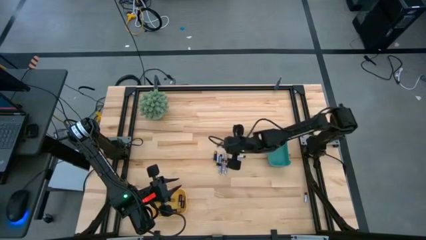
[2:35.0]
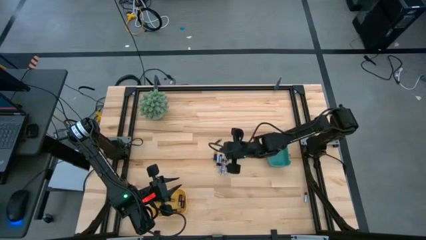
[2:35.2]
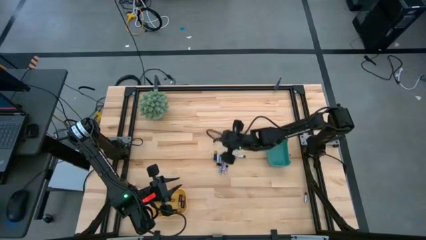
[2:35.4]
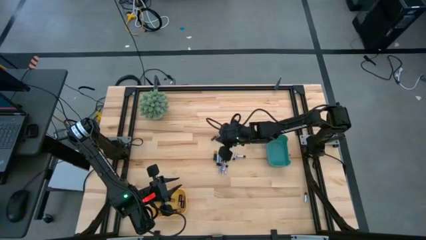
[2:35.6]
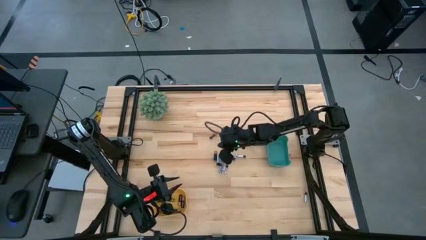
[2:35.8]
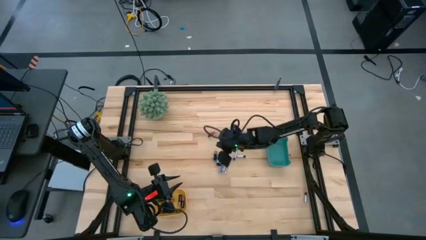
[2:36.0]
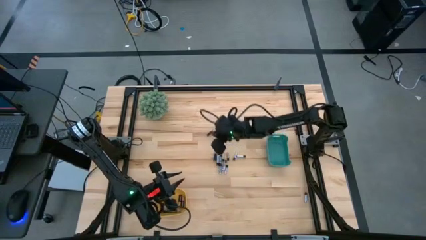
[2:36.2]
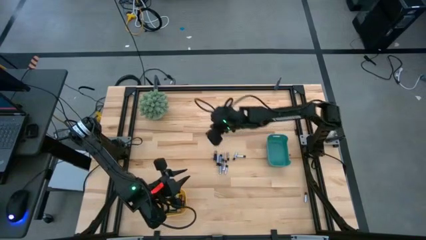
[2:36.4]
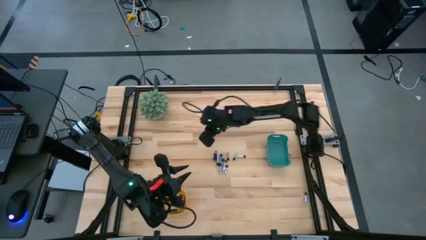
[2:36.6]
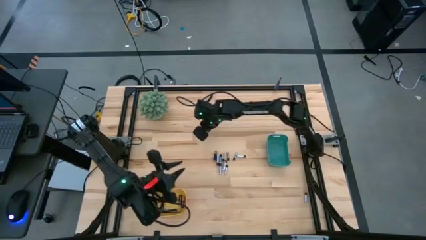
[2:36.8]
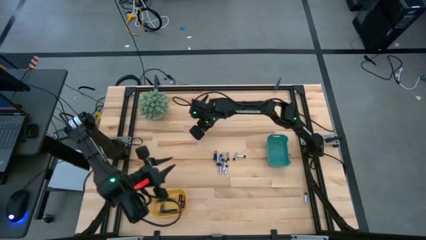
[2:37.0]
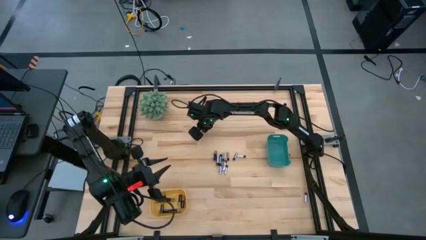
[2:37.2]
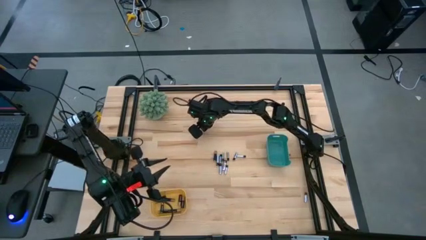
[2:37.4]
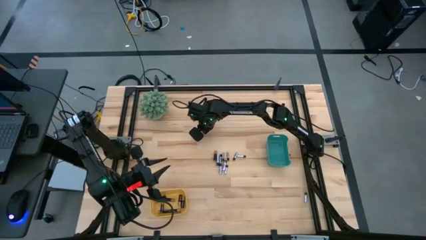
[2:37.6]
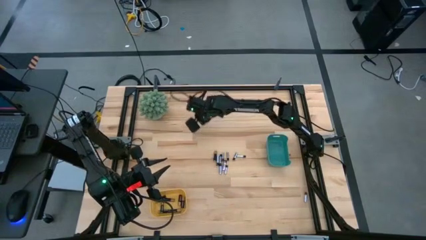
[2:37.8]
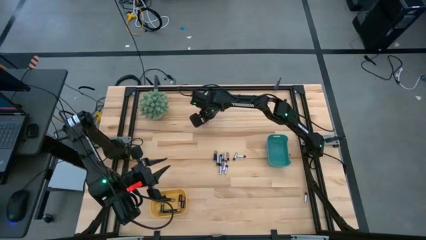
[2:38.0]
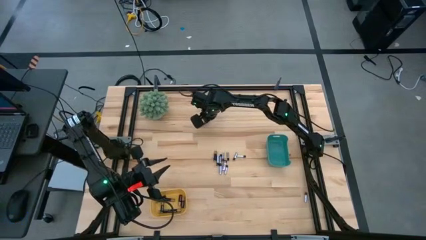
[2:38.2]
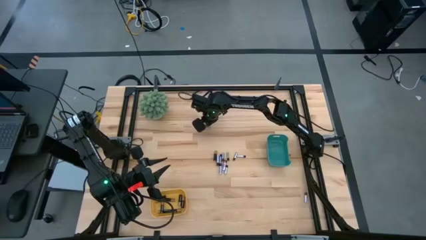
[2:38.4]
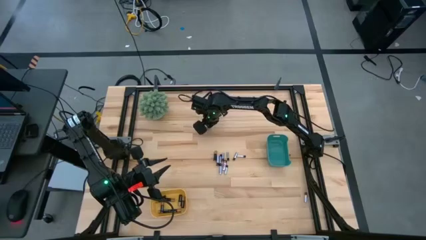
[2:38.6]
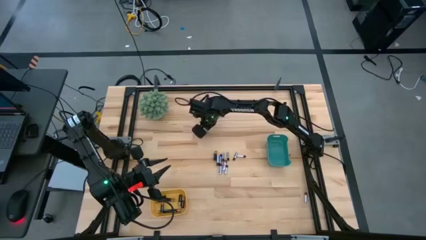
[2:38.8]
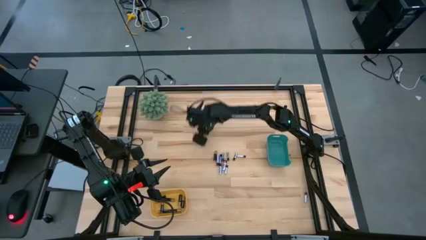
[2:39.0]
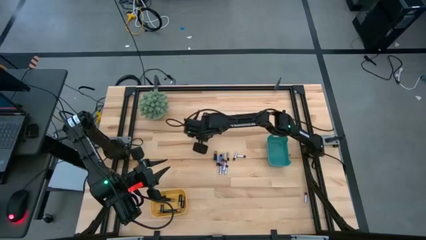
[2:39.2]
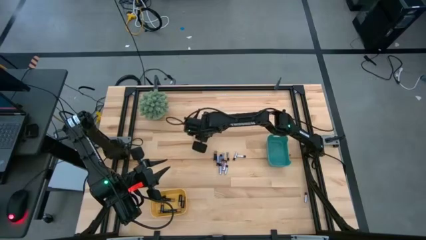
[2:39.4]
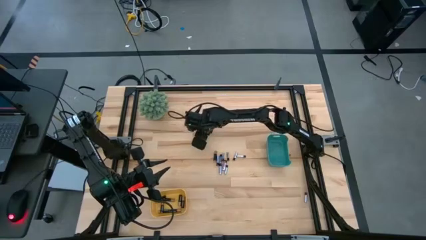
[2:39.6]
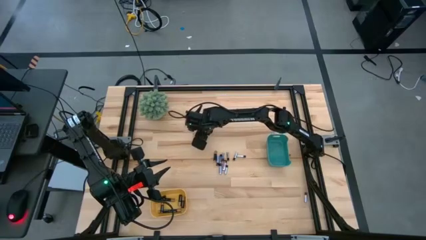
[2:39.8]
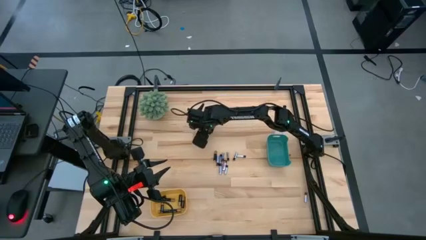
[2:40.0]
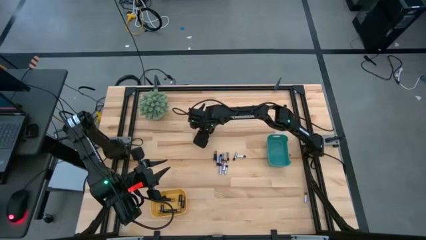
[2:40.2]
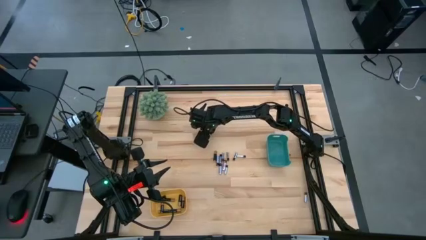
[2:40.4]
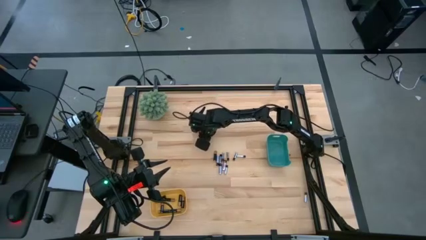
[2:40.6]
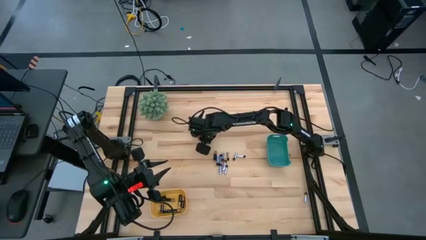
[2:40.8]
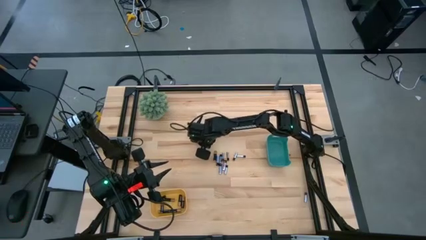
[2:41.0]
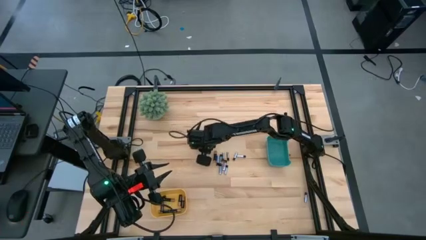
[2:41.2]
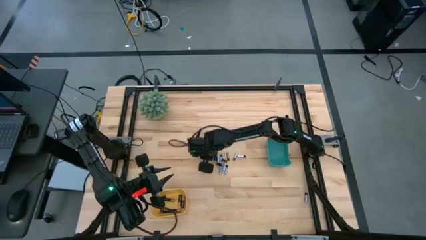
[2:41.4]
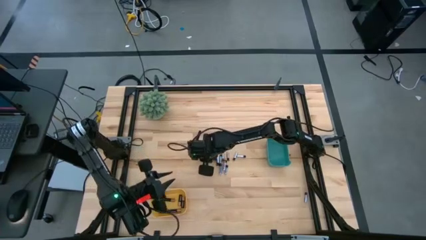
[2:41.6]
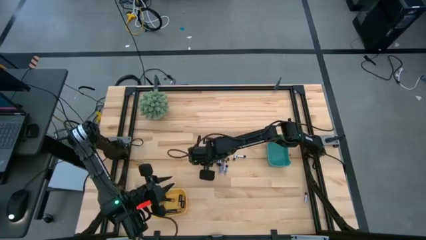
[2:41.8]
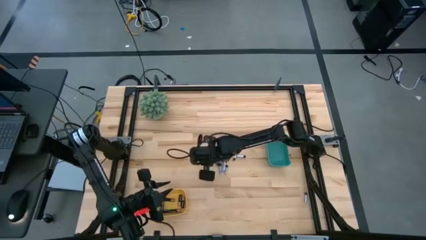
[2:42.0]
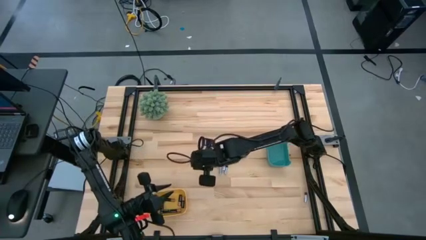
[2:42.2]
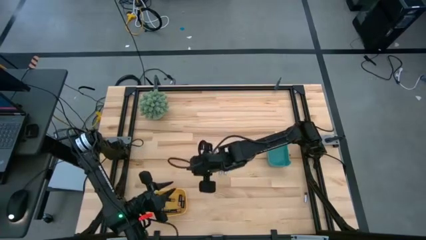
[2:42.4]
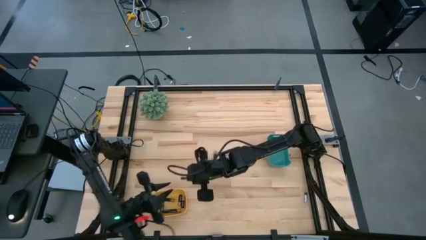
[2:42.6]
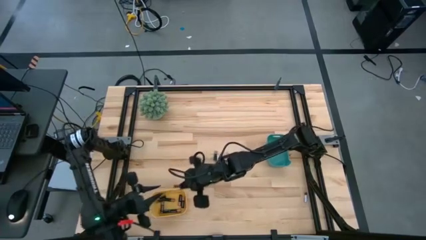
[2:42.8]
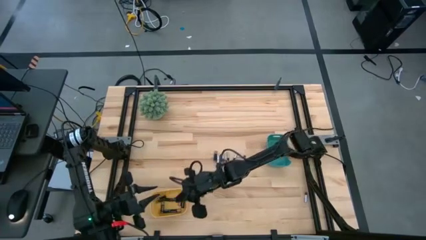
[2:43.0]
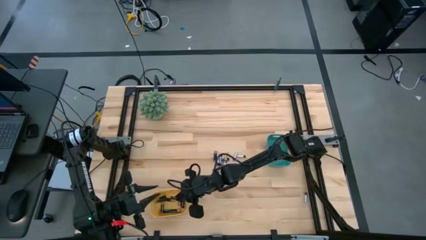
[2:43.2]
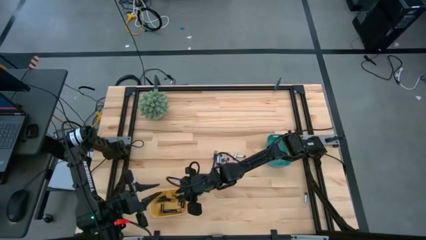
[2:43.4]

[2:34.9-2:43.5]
Task: Sort batteries
Put the black battery into the yellow bin

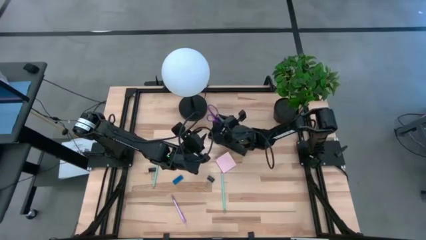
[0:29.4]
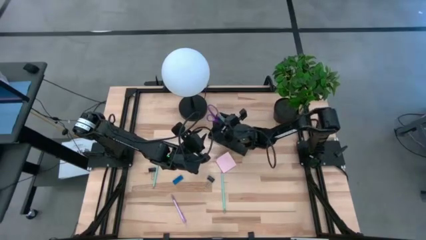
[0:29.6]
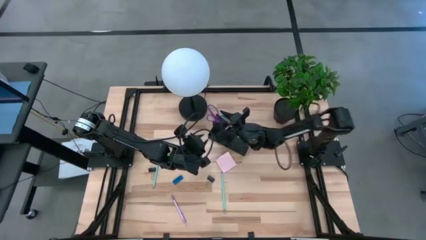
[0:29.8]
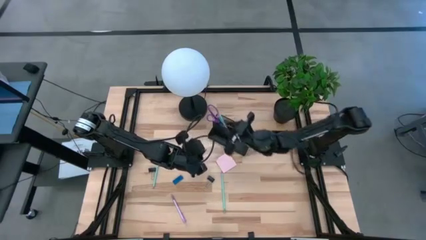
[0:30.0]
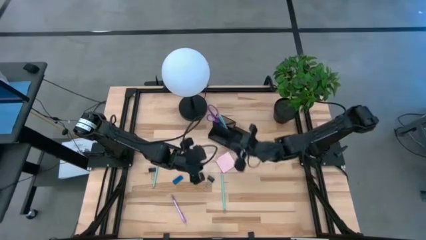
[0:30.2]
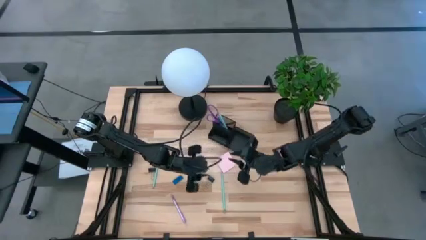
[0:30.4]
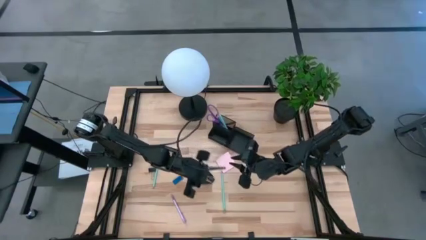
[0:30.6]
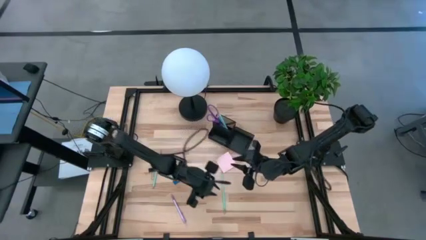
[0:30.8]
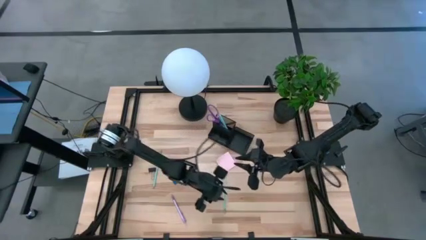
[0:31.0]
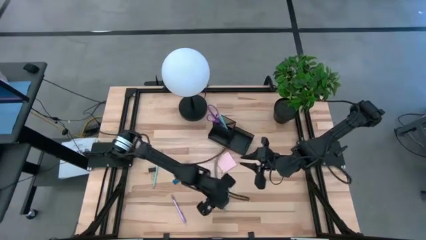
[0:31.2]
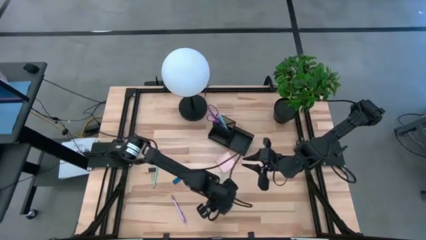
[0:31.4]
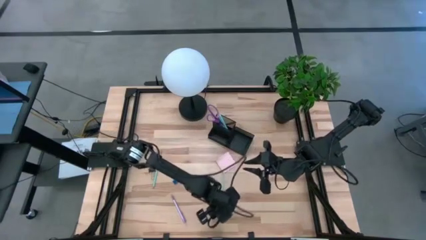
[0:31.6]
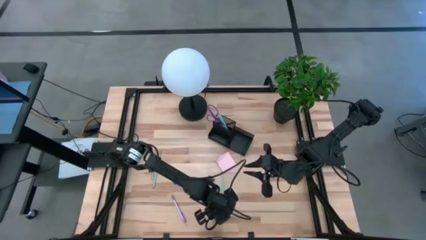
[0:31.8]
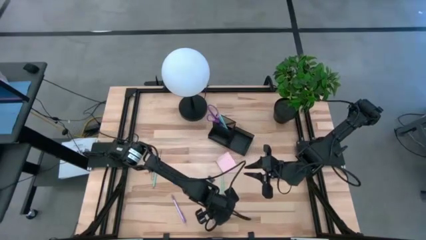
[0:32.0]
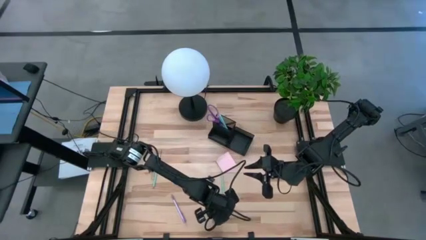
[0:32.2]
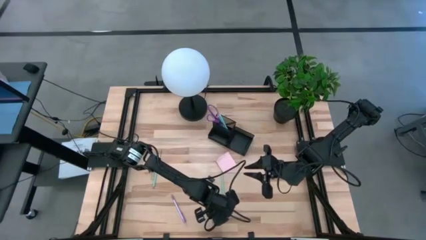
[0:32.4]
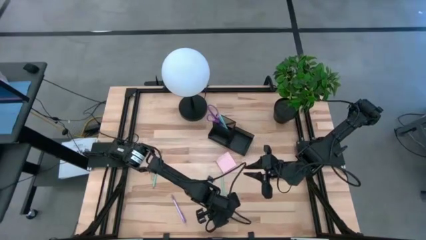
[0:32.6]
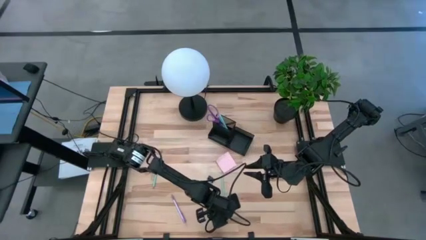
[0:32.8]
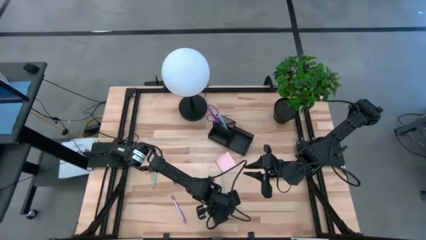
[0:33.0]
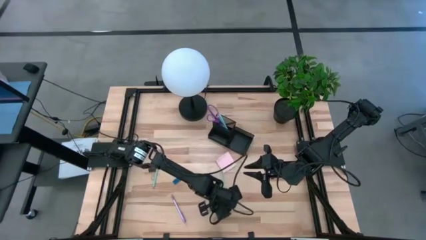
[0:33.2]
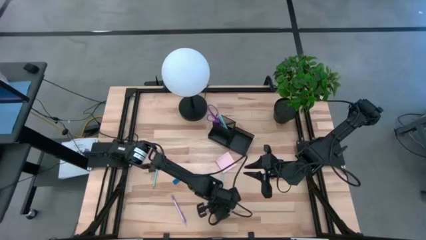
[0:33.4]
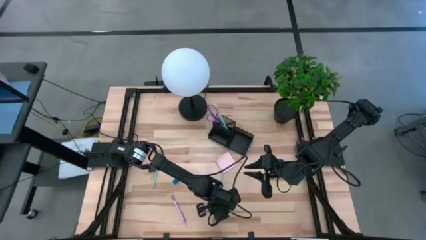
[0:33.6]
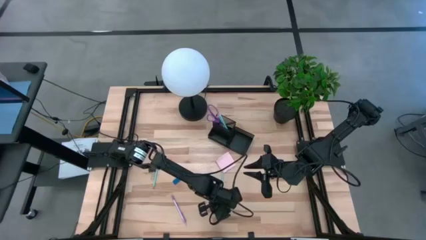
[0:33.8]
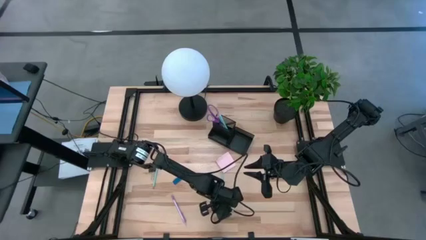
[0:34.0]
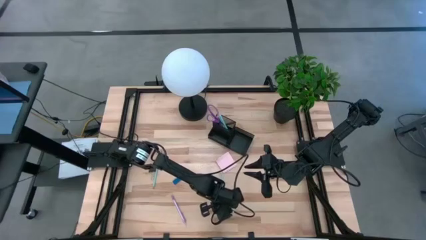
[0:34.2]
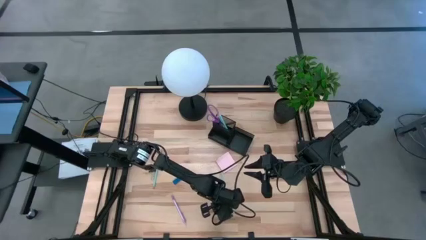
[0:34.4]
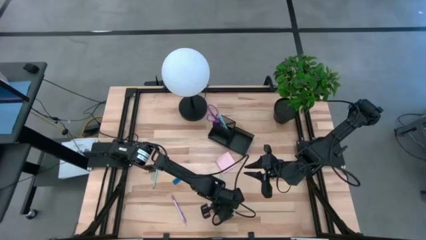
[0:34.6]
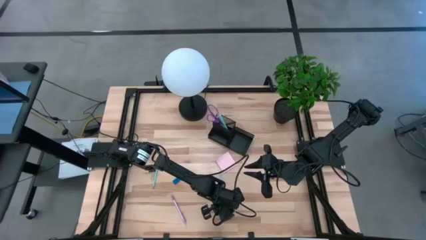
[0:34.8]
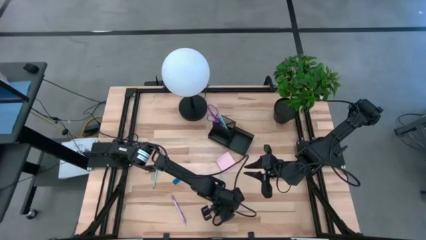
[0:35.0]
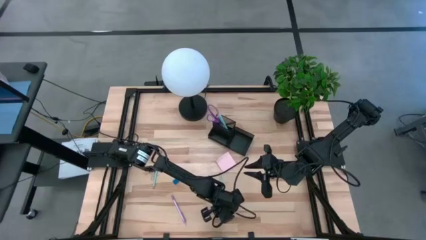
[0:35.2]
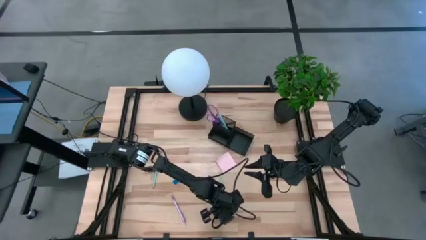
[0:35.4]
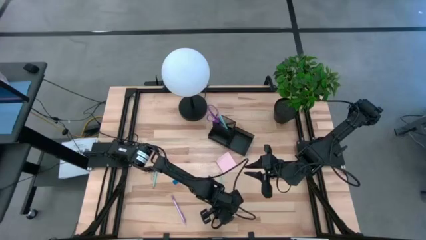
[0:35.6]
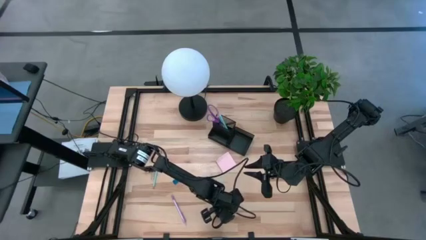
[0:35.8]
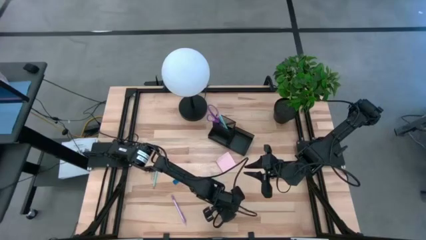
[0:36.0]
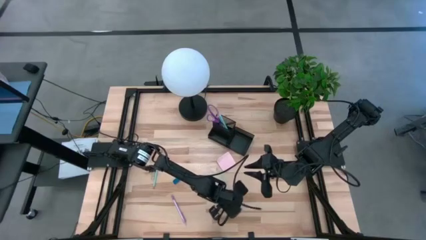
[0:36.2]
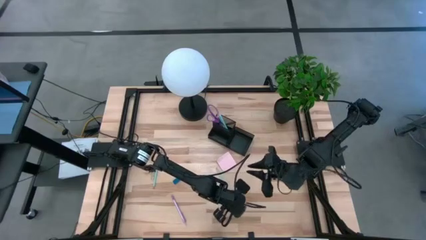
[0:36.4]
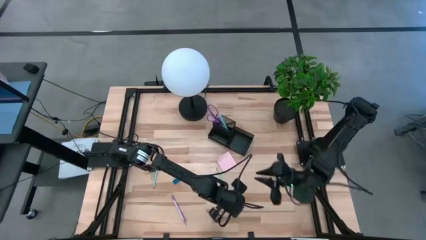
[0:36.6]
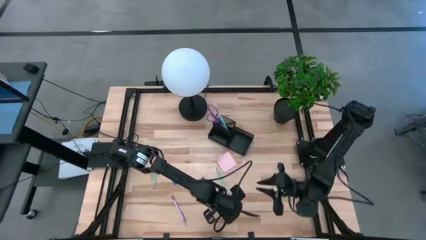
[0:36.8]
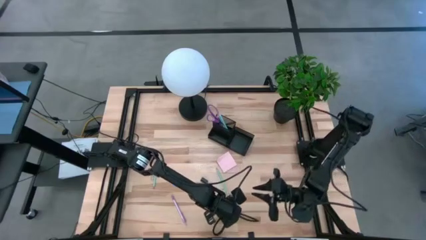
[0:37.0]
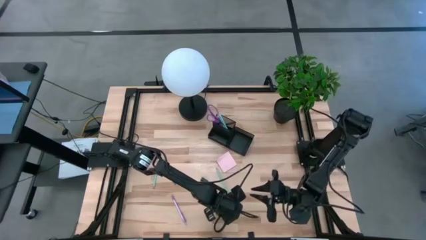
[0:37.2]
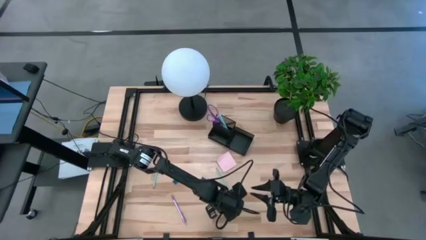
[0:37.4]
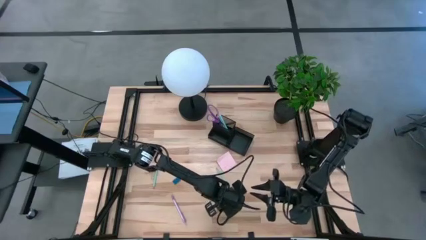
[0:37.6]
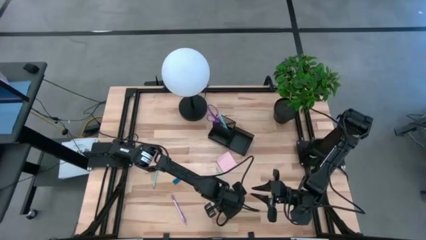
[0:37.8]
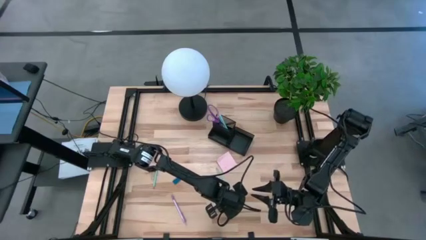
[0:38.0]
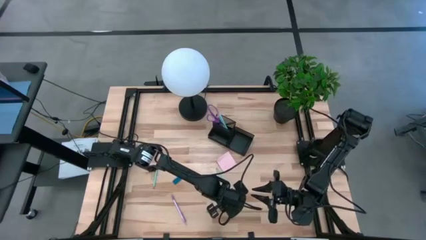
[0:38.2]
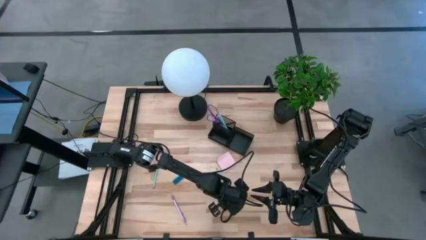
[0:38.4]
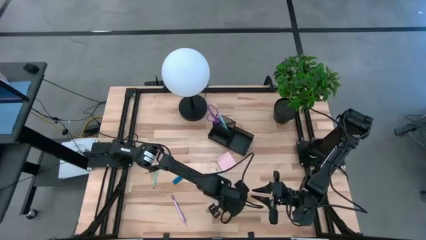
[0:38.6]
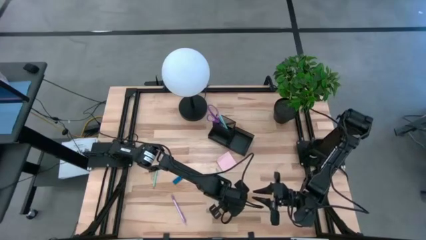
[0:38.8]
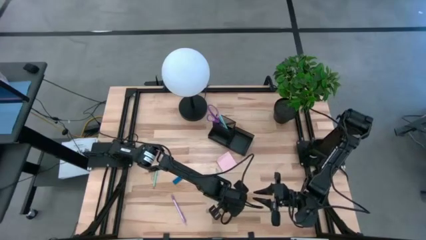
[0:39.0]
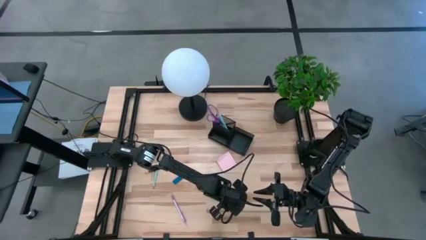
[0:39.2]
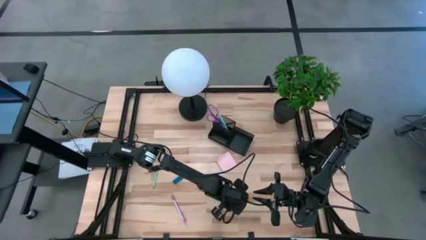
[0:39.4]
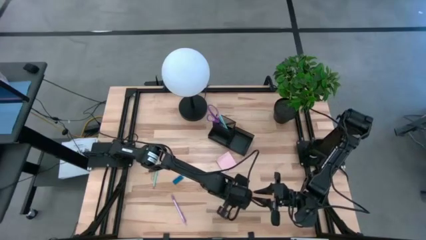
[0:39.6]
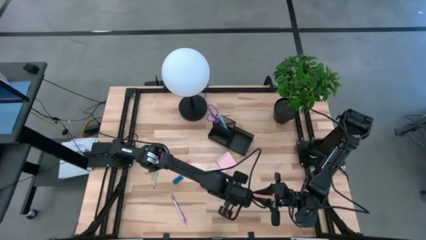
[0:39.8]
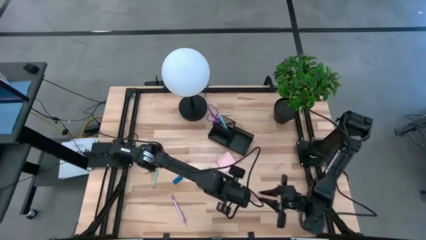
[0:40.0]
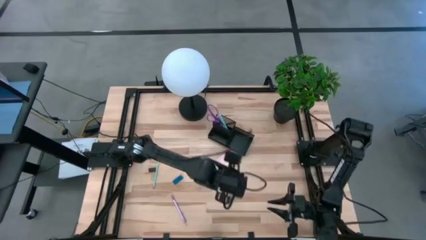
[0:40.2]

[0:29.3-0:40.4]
Task: Pick and place office supplies into organizer
Put the right blue pencil into the desk organizer
